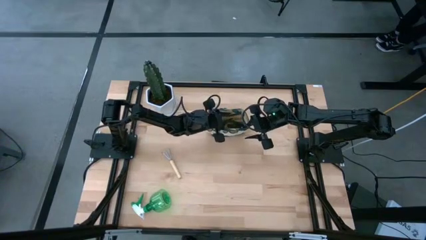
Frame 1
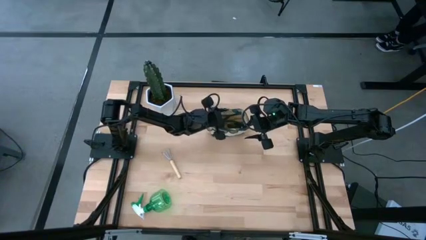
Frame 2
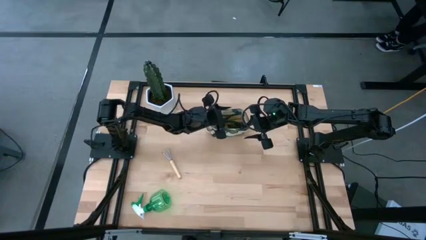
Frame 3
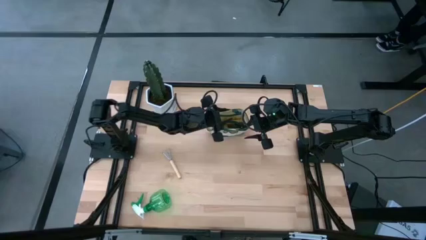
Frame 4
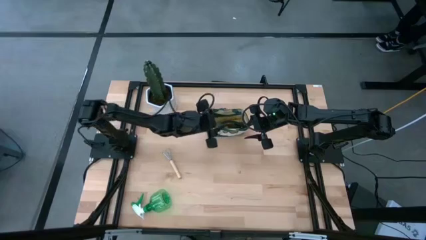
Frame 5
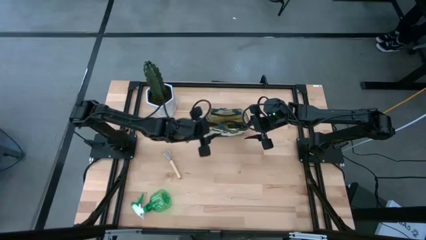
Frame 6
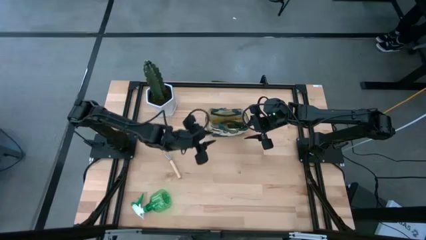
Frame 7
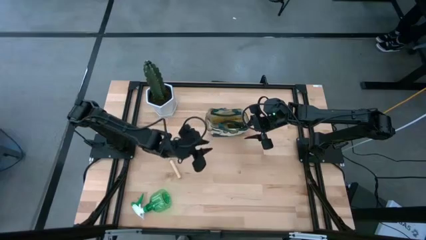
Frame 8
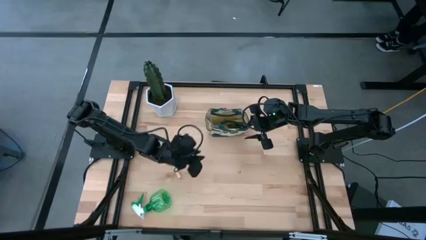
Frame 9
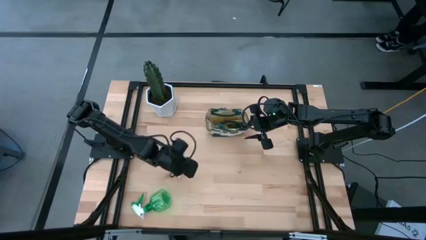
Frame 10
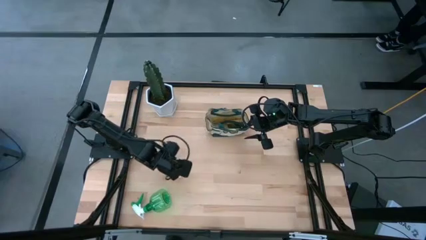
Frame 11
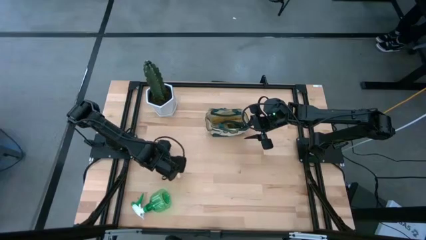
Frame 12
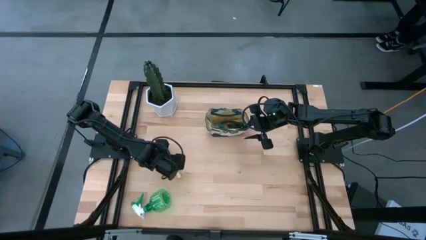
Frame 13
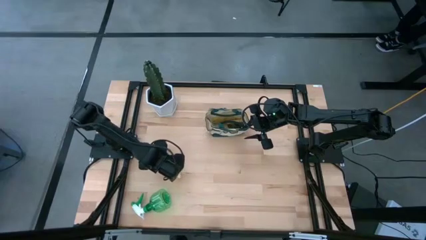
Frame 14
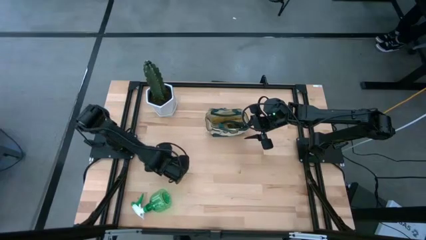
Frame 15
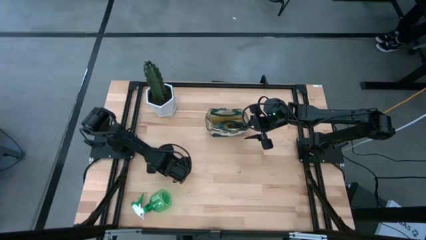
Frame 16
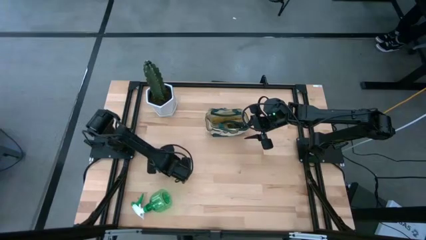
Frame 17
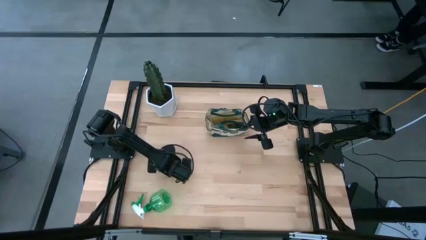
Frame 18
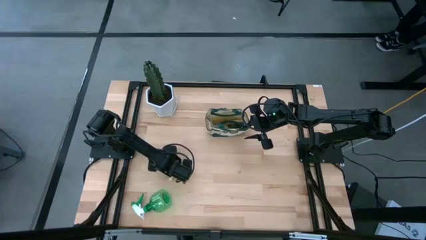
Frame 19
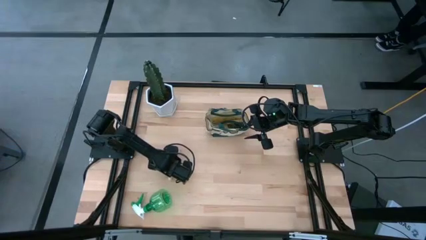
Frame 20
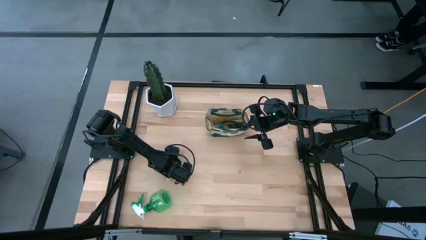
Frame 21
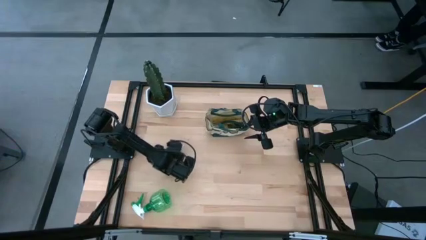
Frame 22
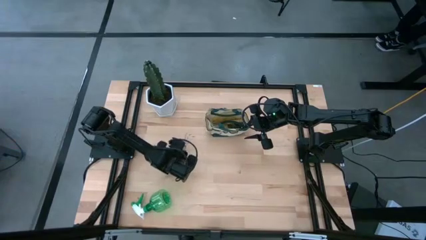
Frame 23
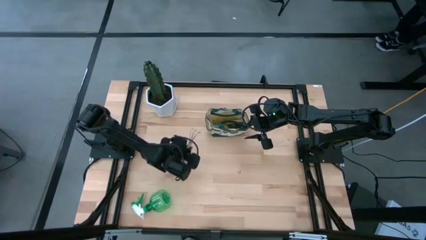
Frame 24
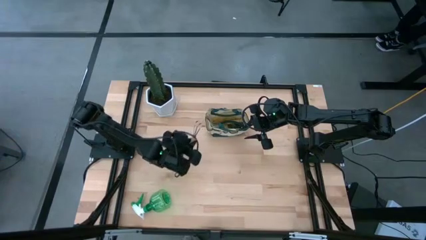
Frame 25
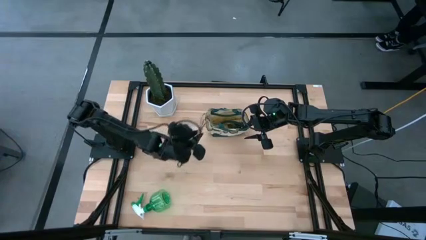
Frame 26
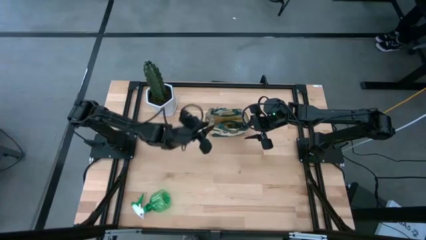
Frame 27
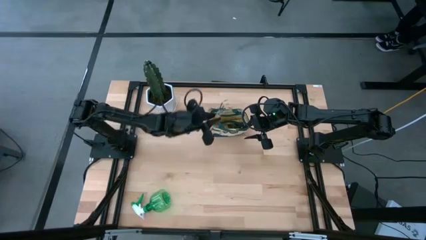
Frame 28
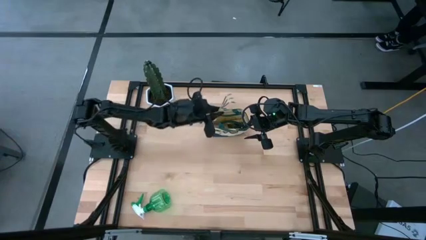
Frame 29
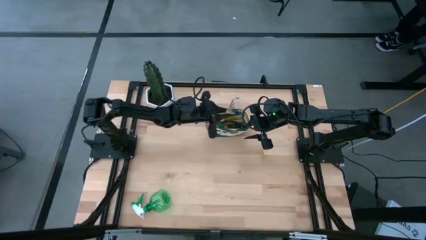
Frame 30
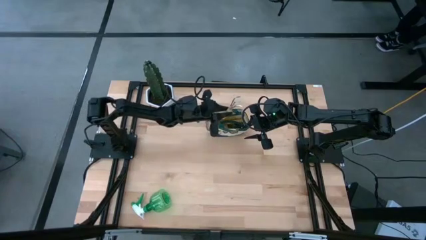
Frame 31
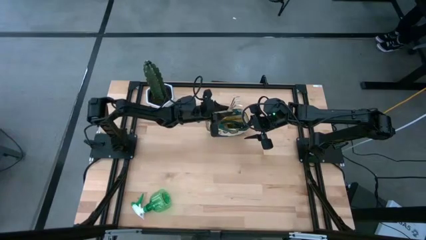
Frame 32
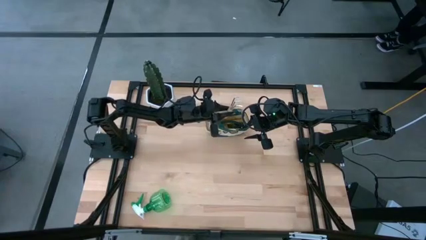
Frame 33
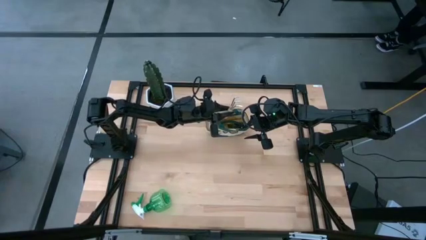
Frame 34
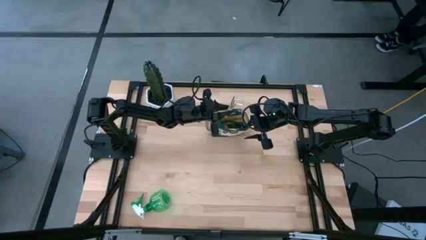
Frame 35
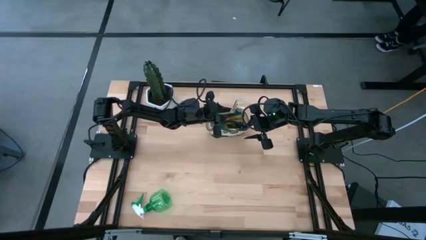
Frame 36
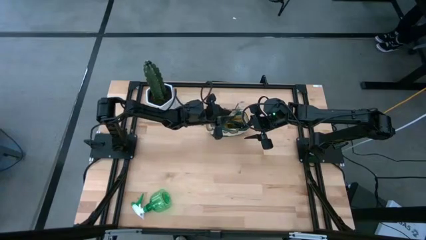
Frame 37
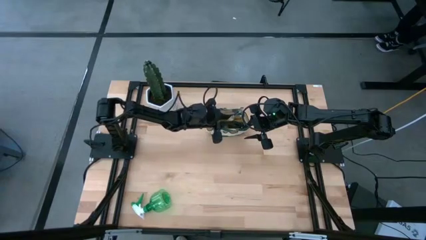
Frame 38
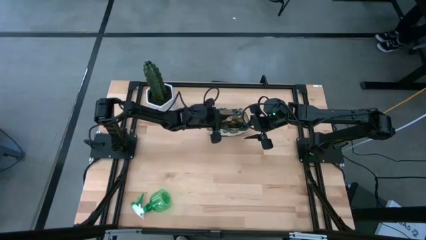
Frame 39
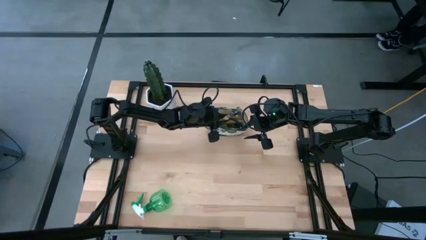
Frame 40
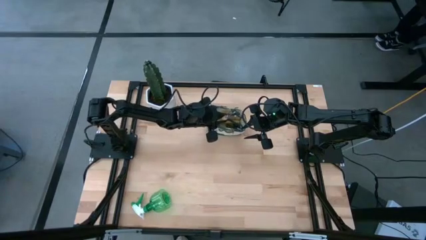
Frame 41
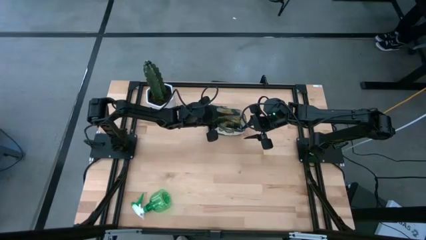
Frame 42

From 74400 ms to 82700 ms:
Task: Pick & Place Garden tools in Gardening bag
Put the hand rake into the gardening bag

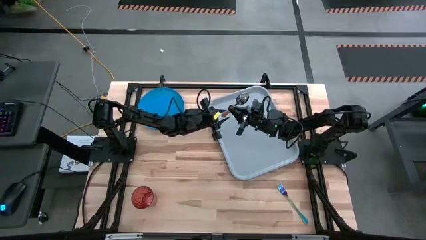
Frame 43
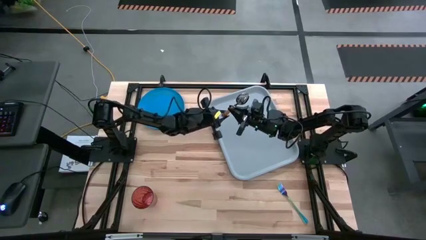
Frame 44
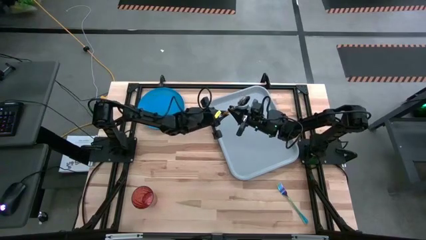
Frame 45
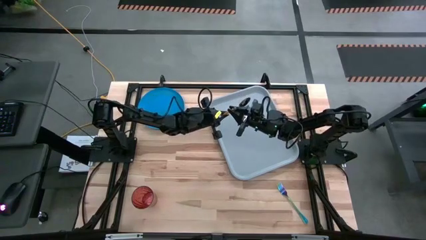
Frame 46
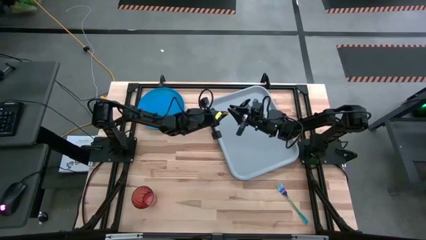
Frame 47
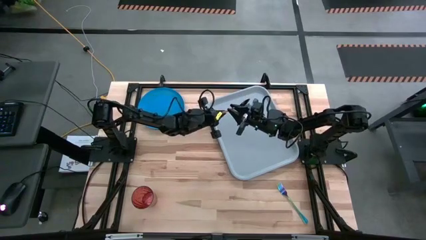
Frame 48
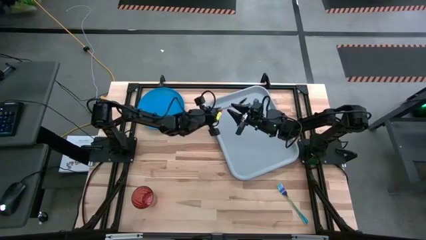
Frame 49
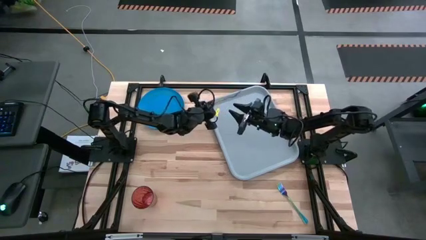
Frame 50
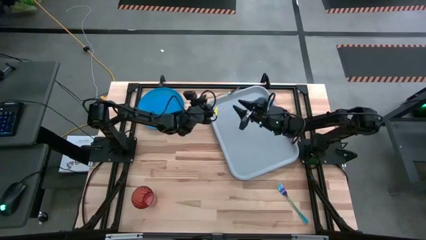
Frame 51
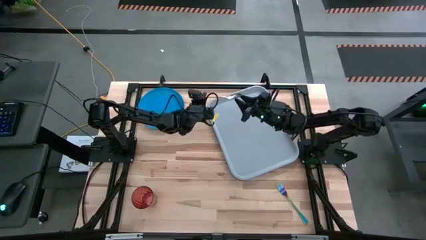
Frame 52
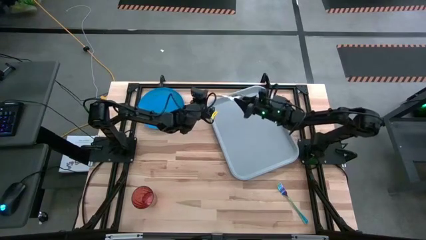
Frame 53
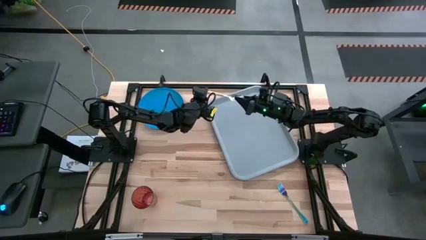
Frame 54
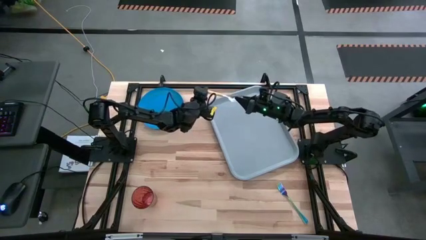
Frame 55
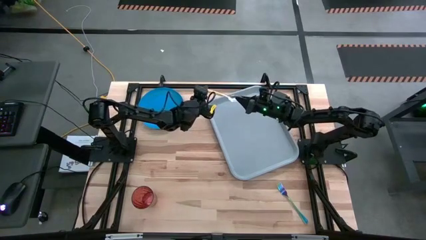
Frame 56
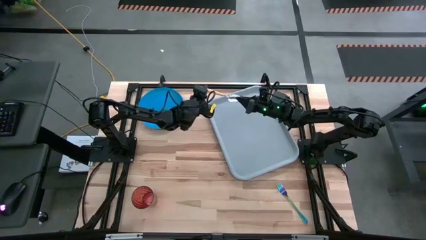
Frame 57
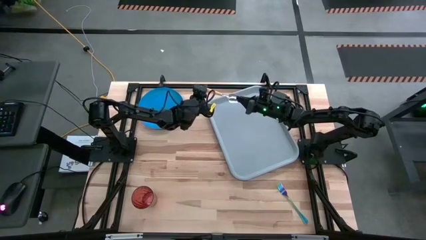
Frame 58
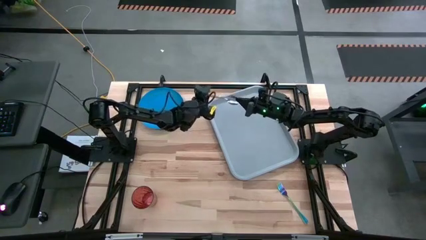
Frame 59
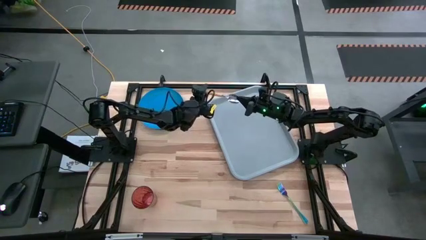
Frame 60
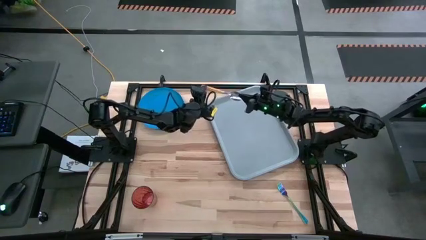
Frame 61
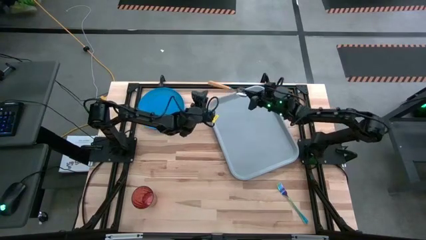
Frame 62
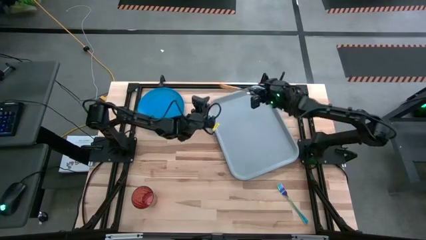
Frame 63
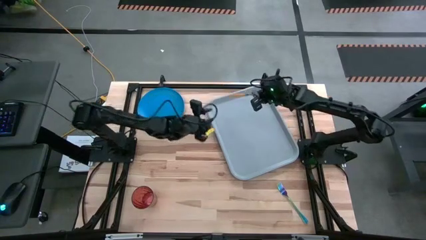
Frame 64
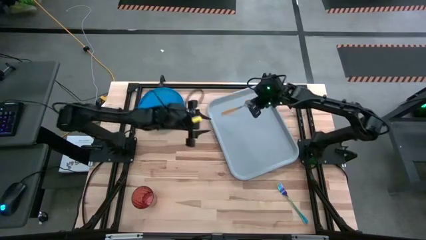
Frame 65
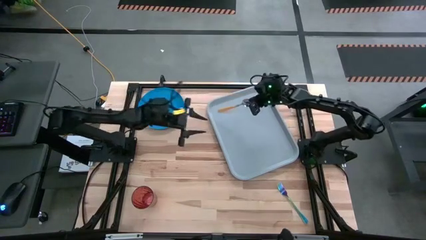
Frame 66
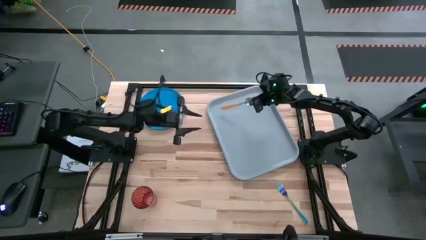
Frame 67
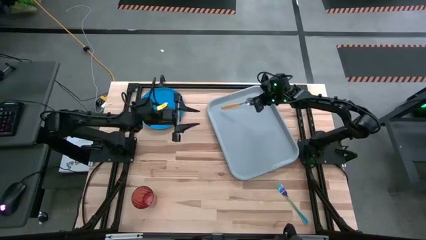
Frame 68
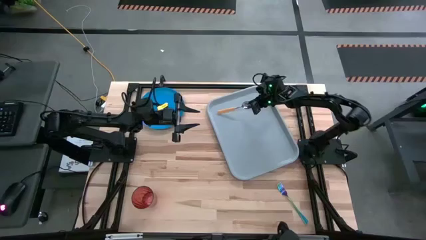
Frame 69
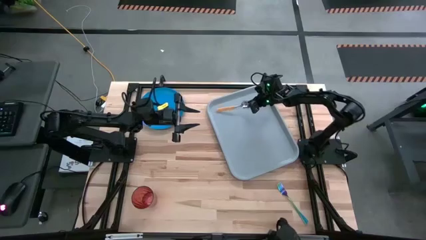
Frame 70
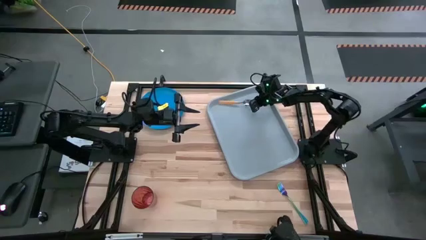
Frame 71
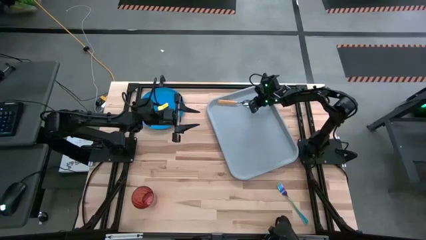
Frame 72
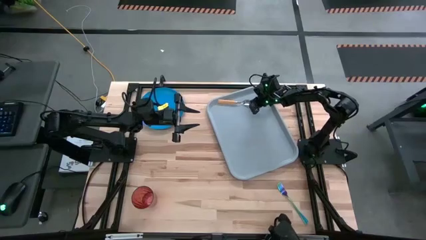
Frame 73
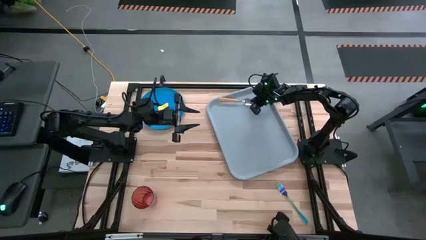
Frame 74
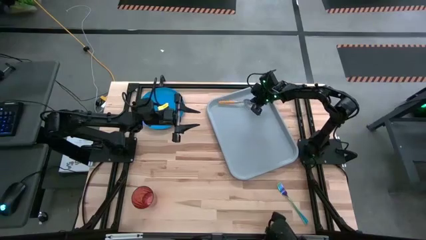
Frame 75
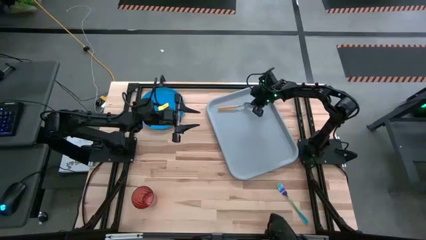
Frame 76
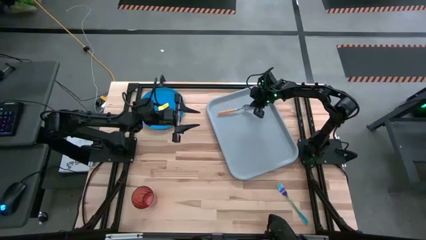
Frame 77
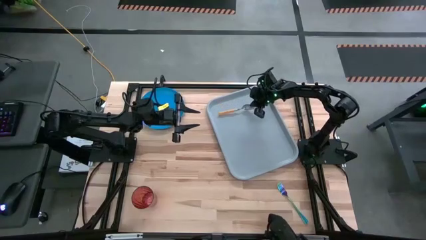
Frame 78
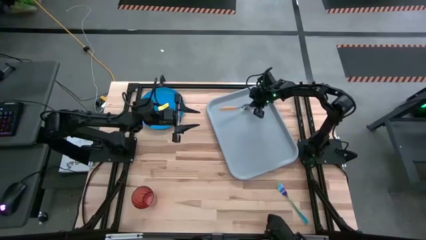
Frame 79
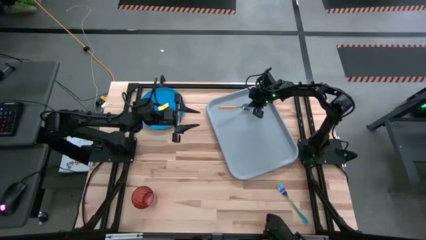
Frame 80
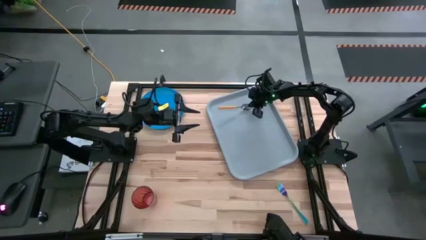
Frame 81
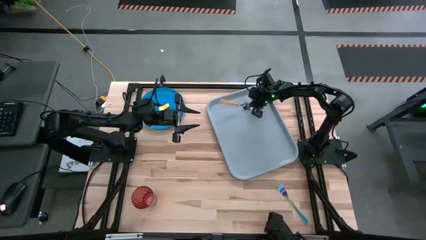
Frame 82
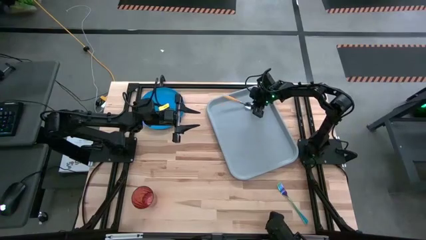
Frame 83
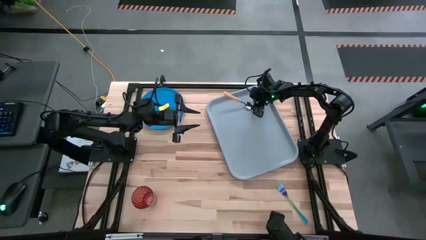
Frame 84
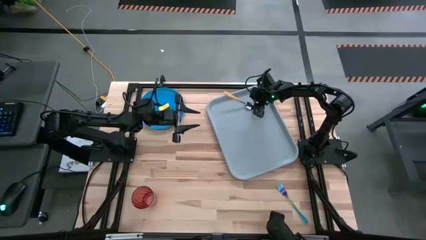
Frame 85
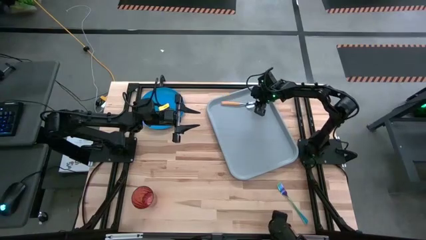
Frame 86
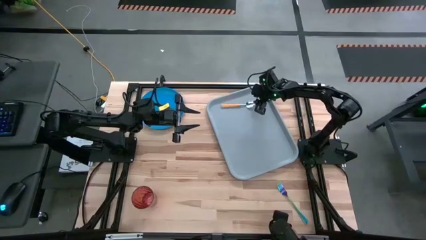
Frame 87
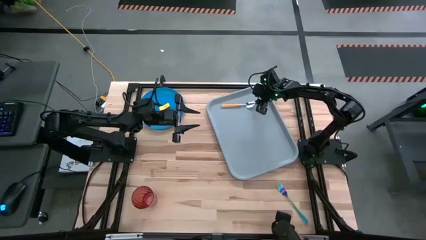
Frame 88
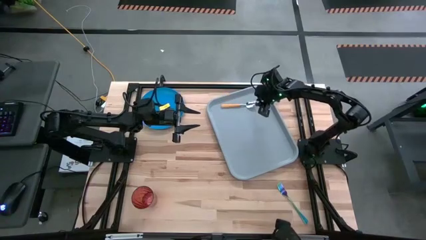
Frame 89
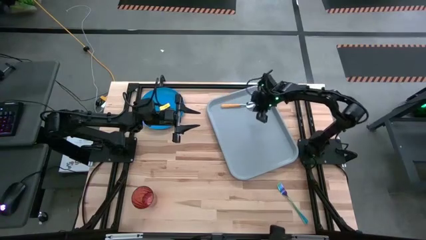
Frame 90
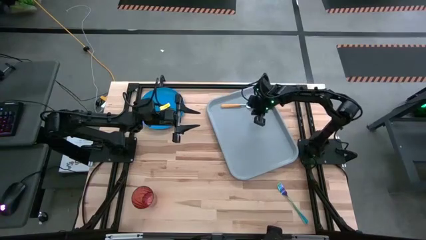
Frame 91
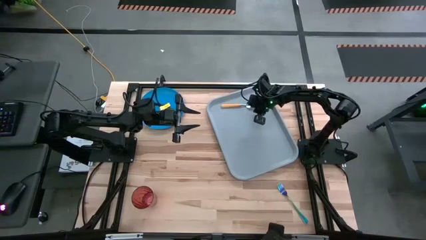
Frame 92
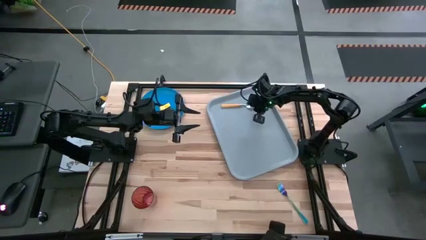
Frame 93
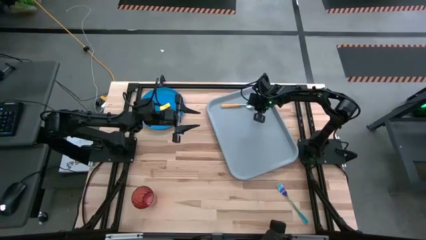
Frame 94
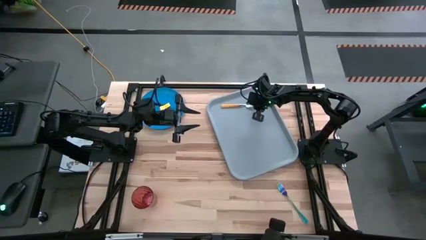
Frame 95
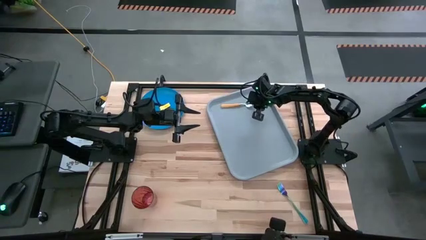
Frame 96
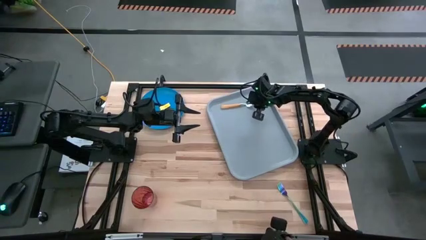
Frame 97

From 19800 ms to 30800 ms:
Task: Pick and place plate/cup/fork/spoon on tray
Put the yellow spoon on the gray serving tray
